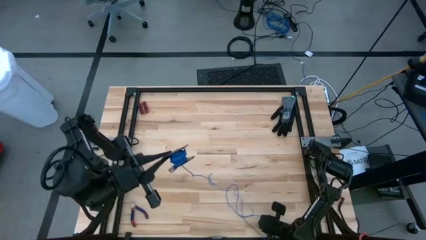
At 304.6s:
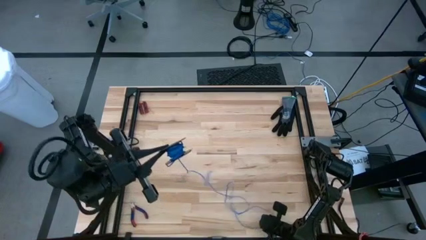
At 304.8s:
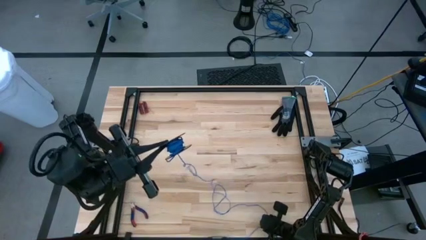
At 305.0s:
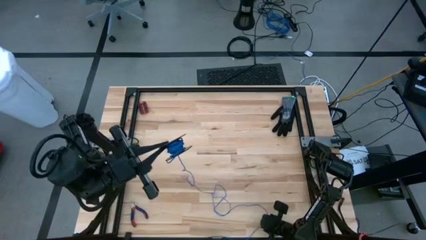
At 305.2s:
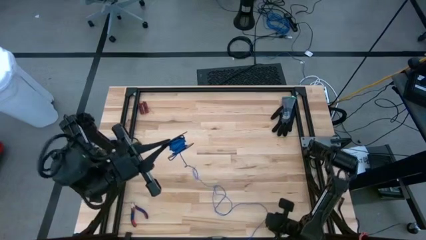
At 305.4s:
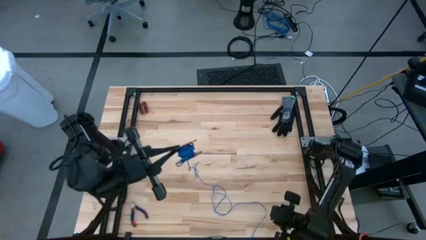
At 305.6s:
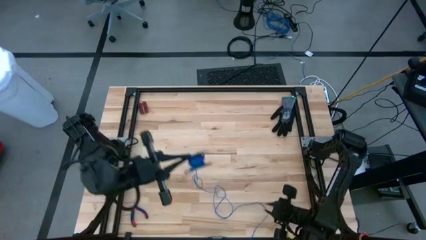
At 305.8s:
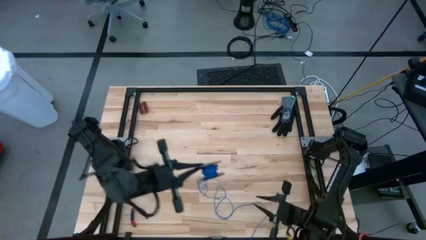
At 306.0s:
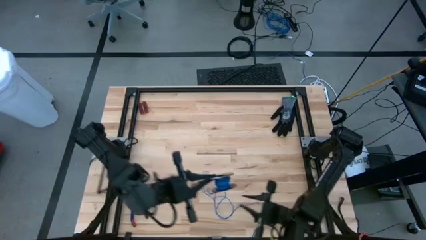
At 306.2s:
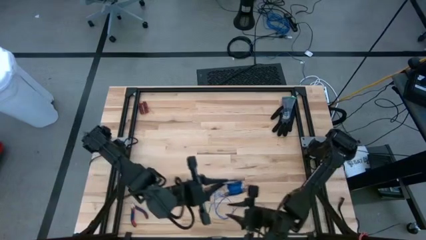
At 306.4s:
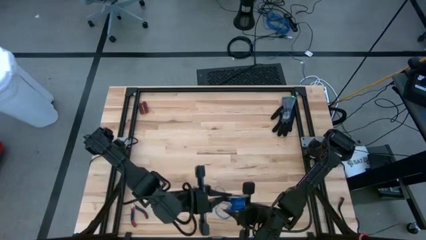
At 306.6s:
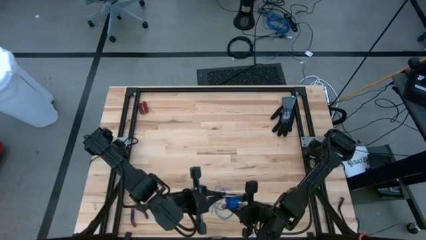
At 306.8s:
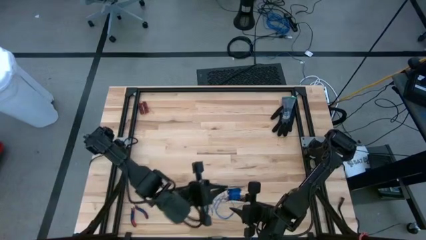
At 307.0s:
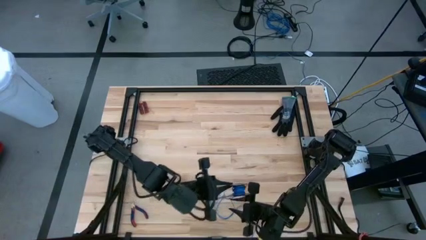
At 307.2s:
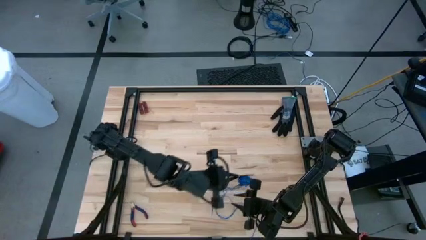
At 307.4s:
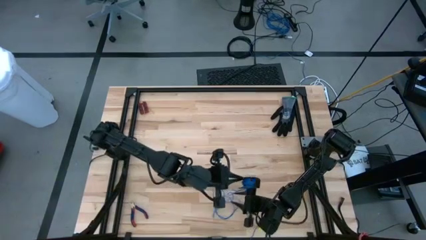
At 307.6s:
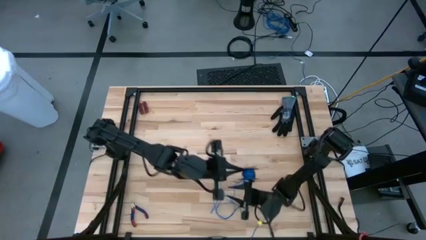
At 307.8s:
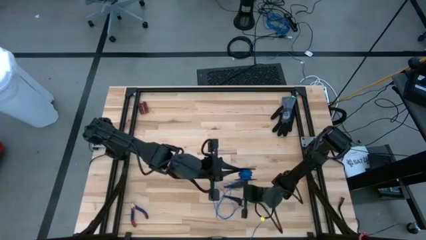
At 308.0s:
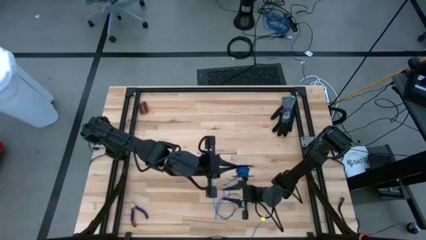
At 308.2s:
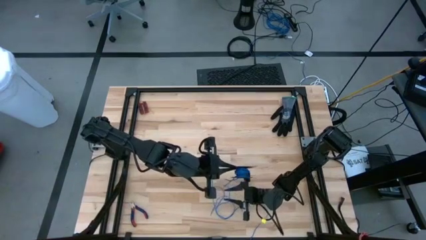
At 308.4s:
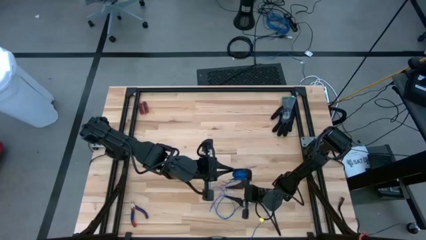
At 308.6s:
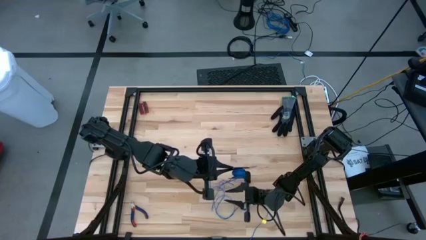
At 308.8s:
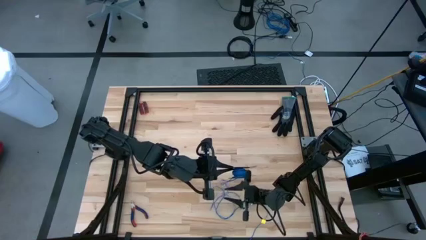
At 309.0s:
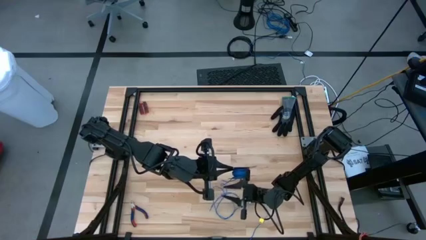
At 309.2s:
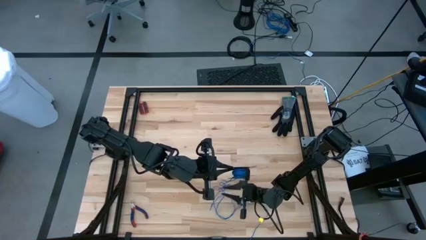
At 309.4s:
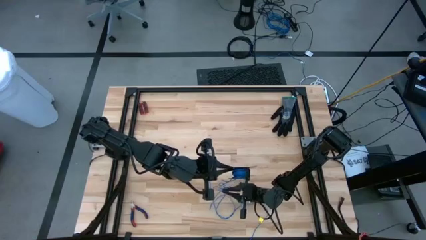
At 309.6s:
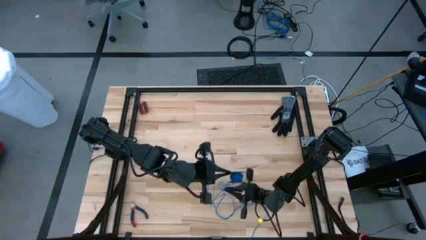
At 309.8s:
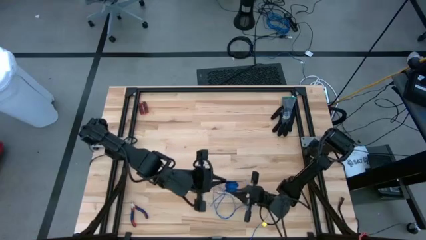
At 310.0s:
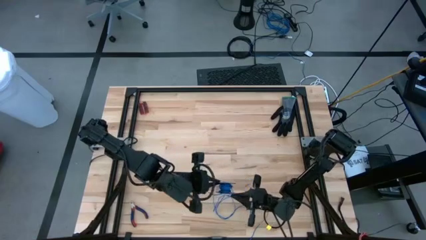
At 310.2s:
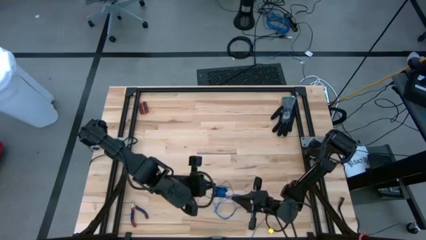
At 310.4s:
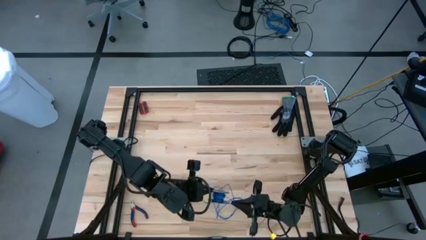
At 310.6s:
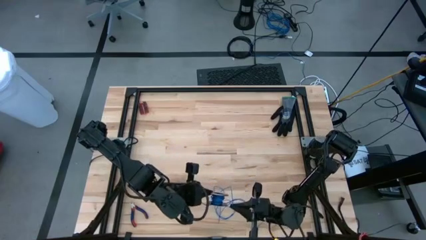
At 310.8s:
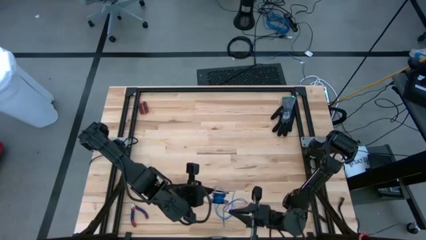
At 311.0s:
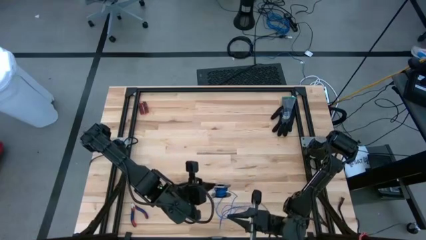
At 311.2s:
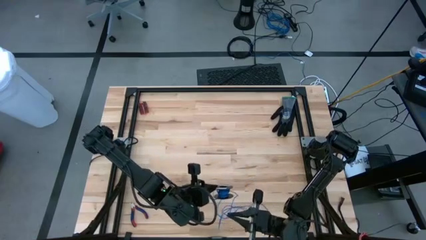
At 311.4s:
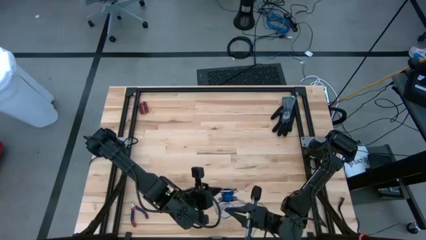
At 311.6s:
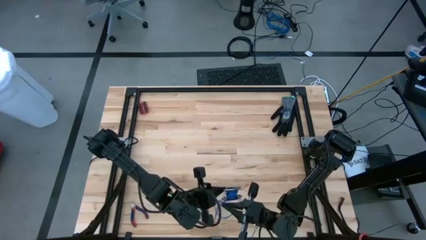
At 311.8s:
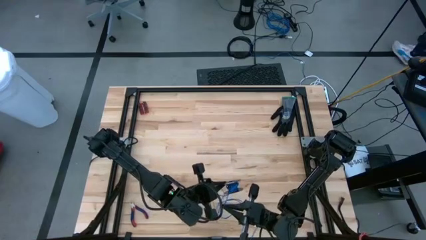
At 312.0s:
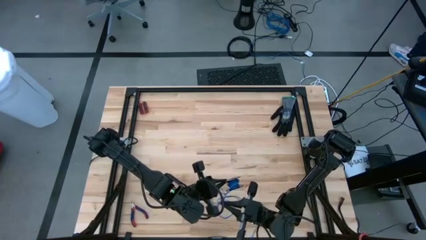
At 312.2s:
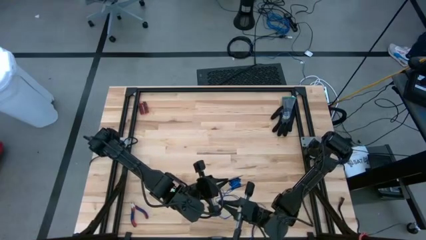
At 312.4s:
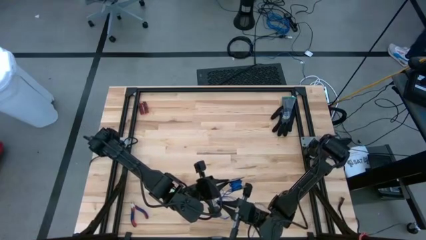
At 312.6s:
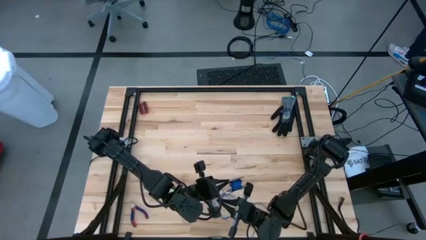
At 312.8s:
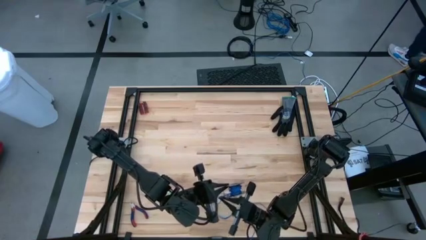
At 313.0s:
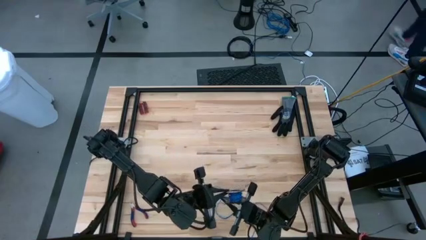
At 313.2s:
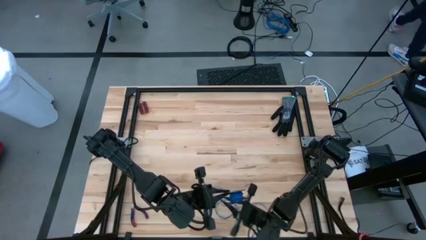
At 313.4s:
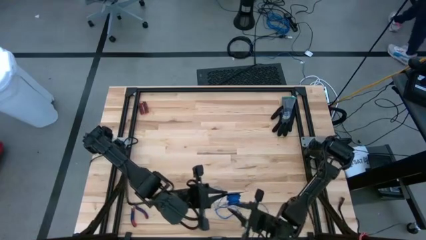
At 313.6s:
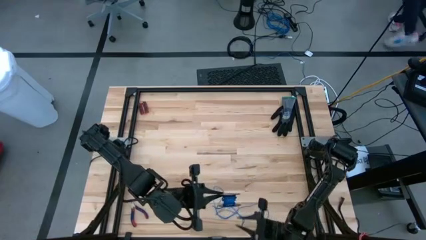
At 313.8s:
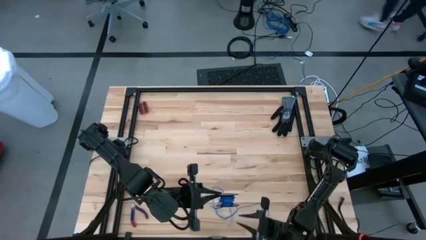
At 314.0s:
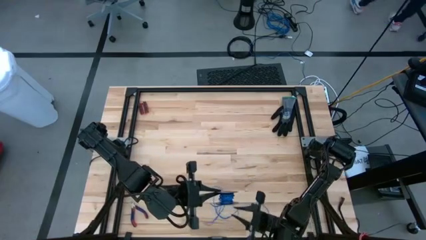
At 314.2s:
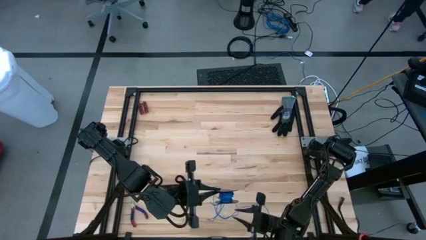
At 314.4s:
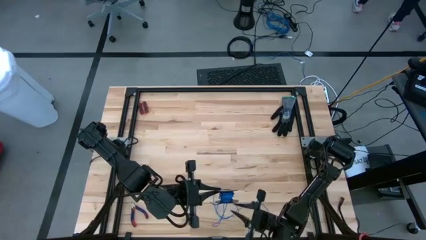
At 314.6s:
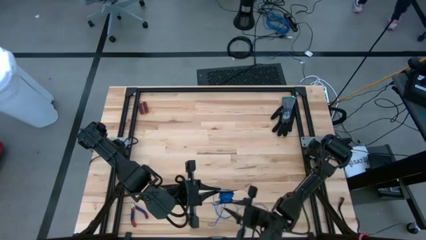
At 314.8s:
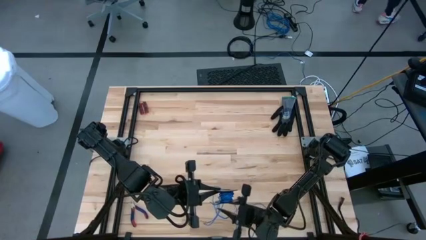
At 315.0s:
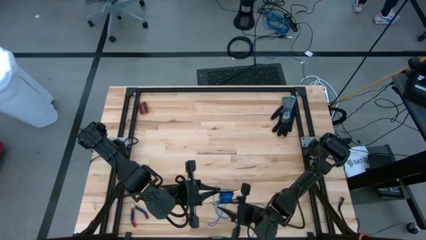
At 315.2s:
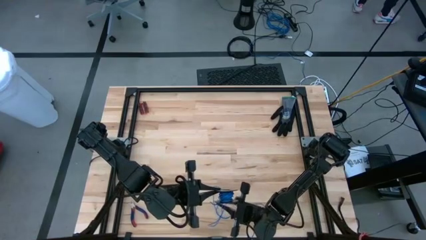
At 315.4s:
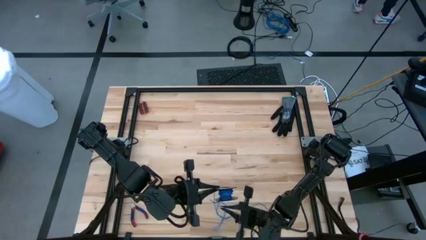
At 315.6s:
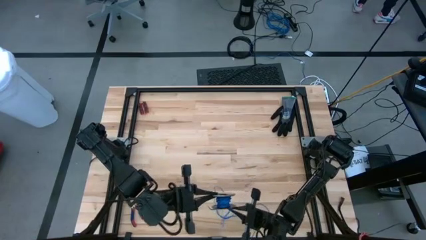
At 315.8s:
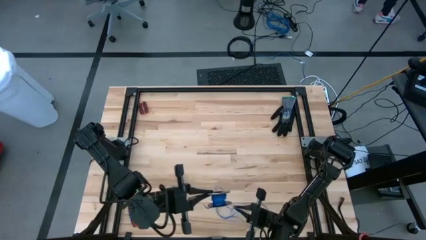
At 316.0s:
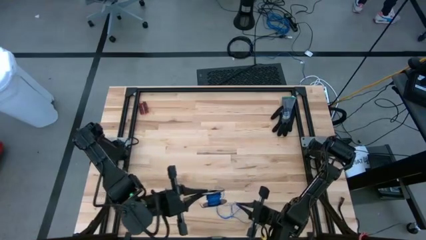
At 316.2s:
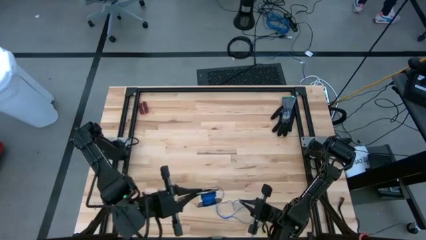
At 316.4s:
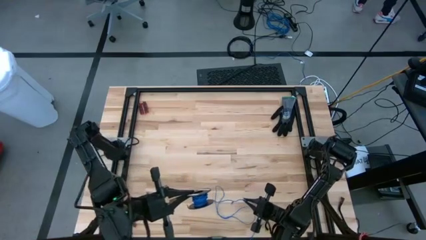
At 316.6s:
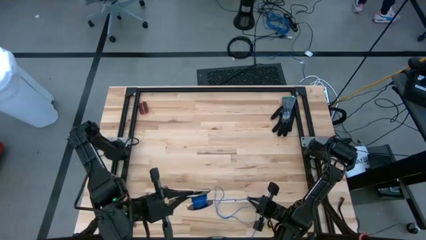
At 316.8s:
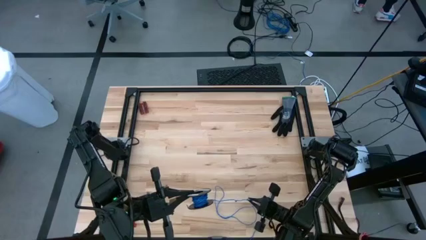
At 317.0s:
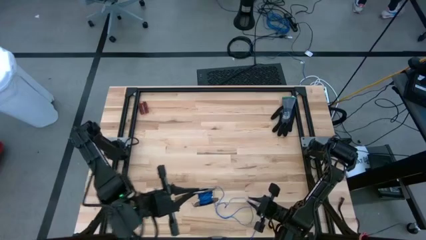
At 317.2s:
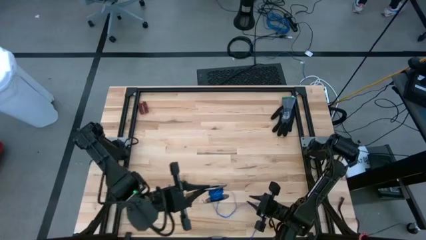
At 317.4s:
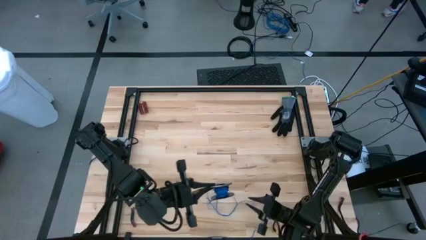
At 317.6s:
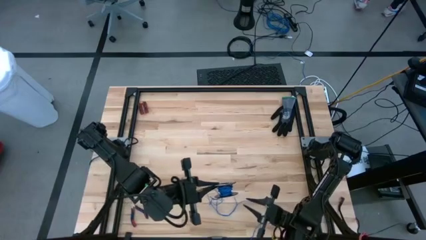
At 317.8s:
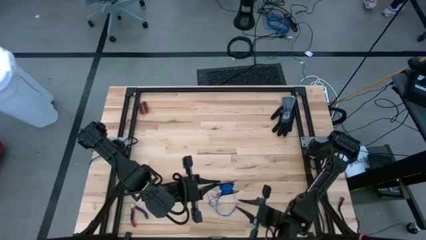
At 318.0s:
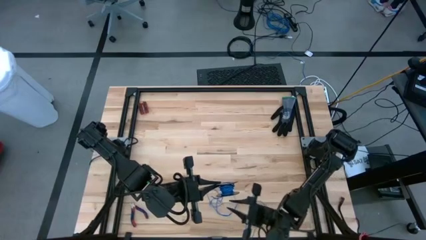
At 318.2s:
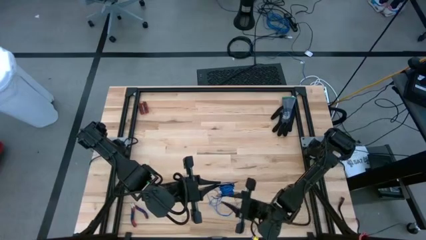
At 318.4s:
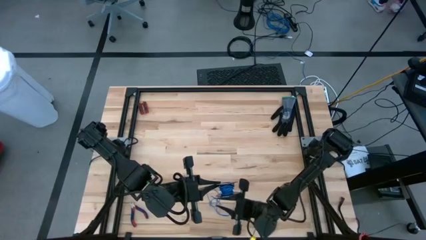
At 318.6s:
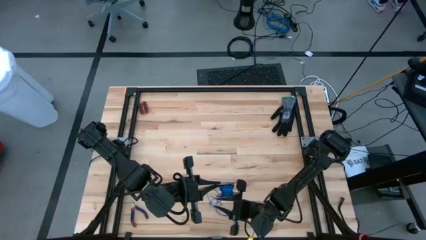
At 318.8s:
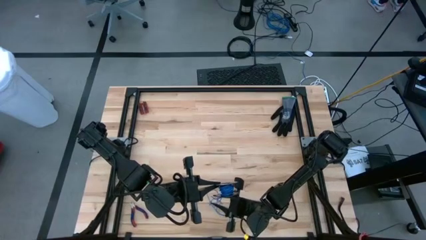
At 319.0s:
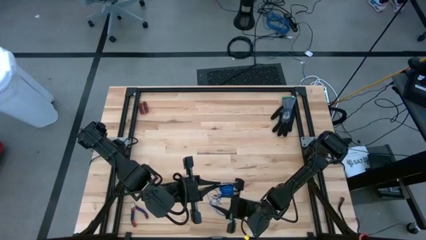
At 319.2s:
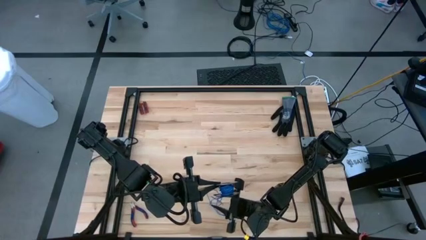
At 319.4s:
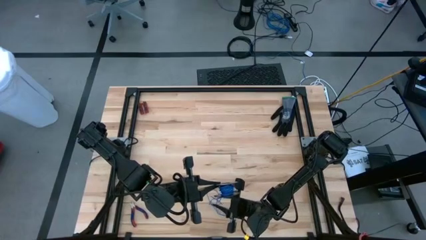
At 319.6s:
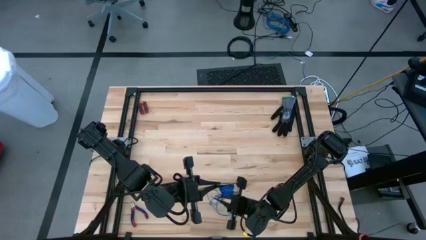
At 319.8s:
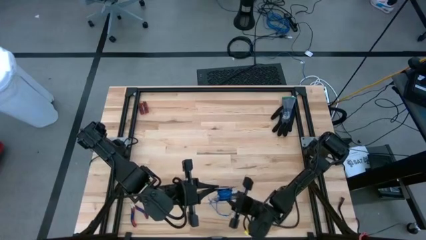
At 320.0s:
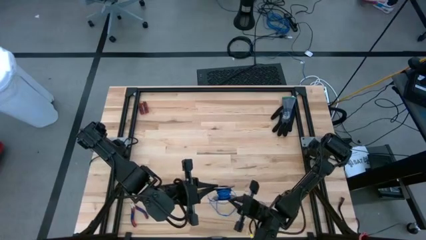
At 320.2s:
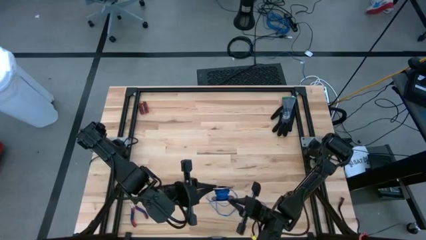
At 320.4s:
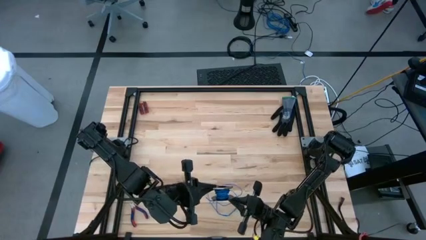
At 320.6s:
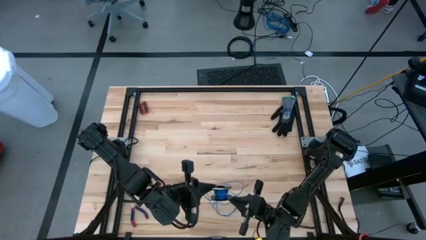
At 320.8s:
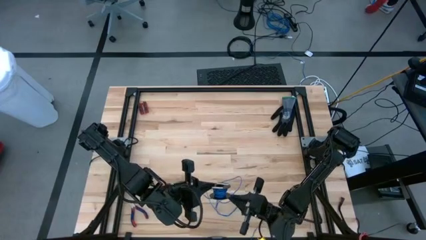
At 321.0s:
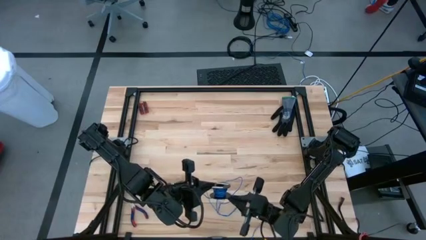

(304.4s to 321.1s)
Task: Coil cords
Coil the blue wire onto a spool
